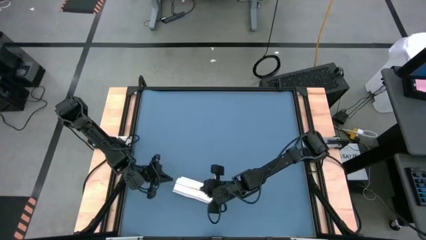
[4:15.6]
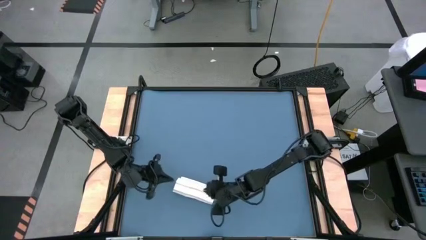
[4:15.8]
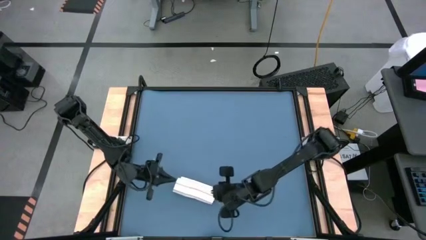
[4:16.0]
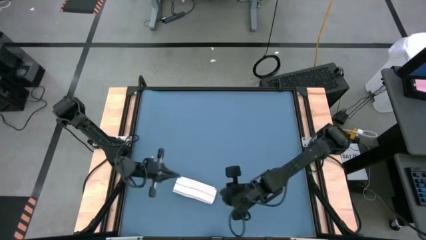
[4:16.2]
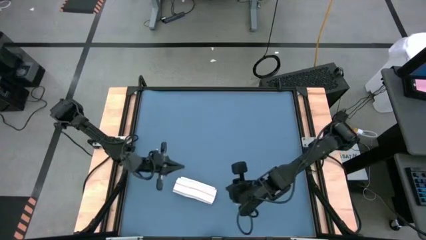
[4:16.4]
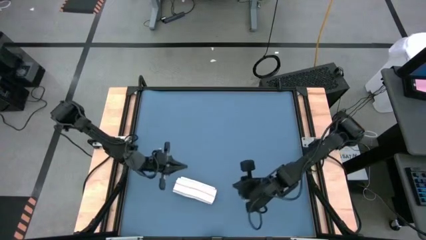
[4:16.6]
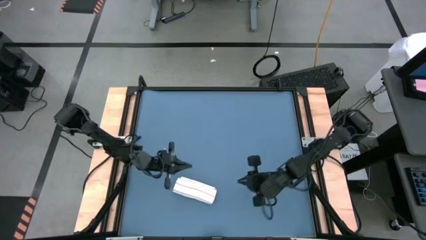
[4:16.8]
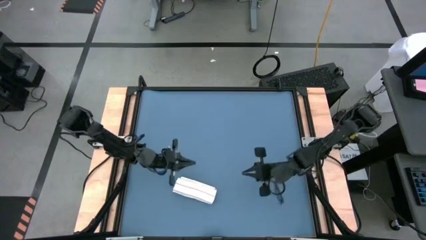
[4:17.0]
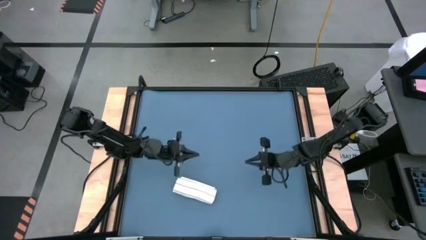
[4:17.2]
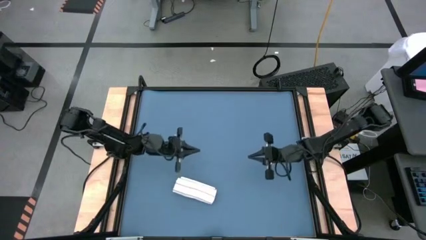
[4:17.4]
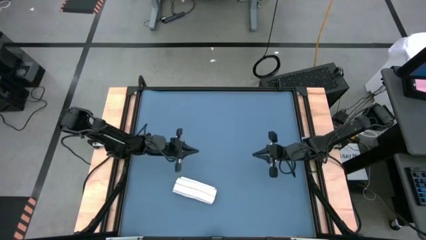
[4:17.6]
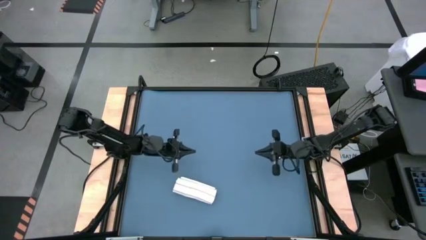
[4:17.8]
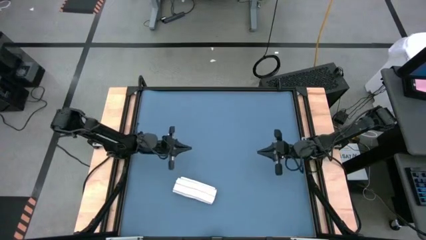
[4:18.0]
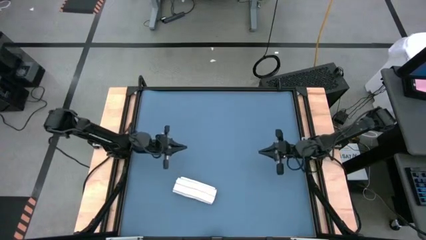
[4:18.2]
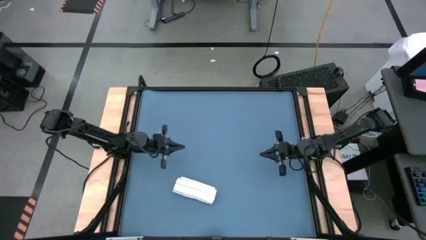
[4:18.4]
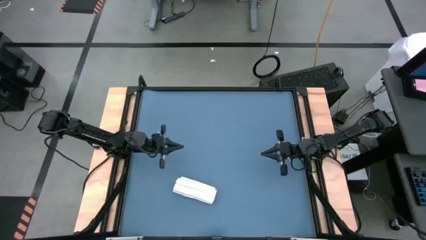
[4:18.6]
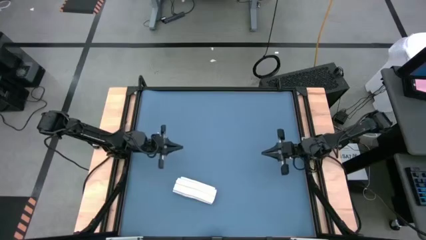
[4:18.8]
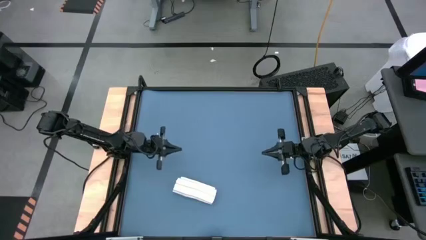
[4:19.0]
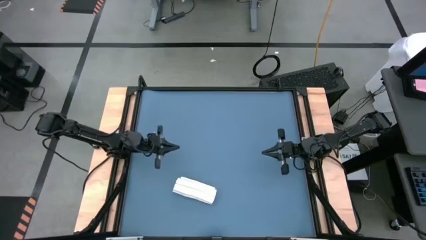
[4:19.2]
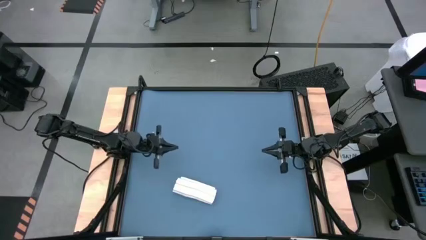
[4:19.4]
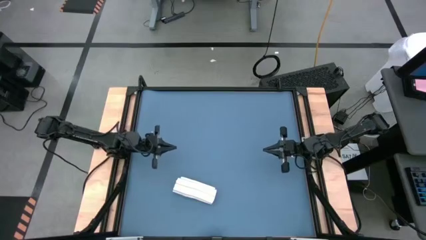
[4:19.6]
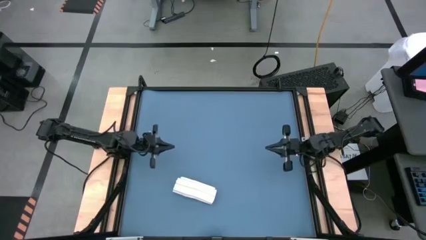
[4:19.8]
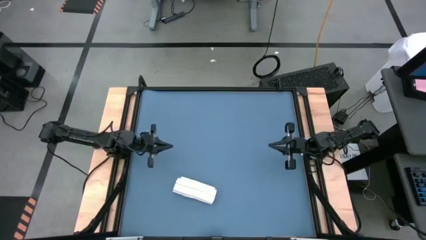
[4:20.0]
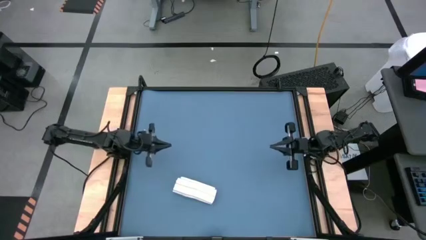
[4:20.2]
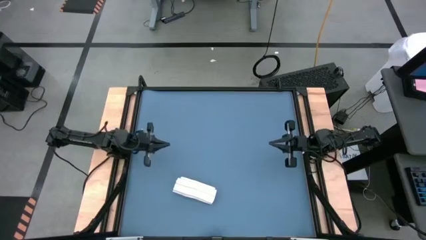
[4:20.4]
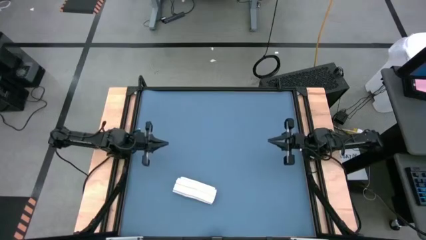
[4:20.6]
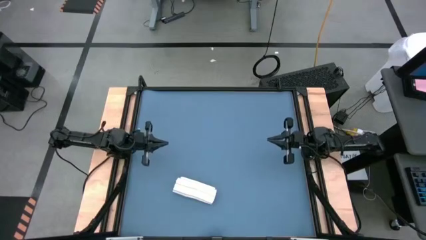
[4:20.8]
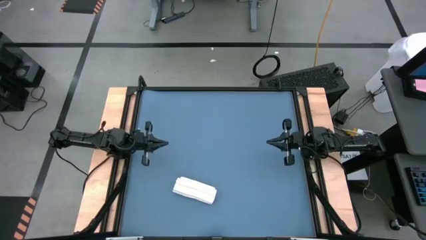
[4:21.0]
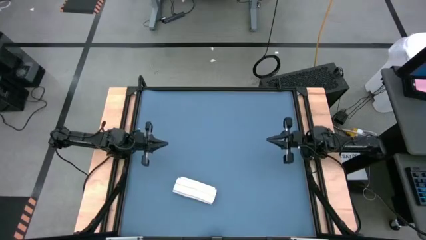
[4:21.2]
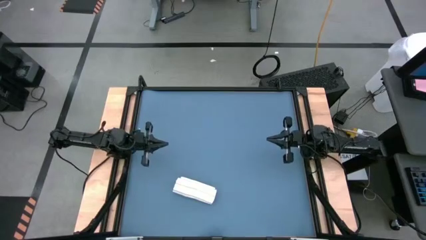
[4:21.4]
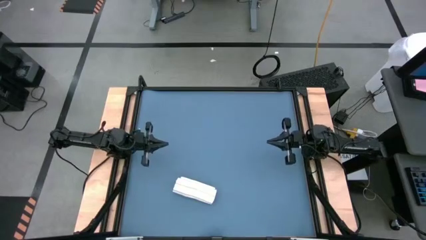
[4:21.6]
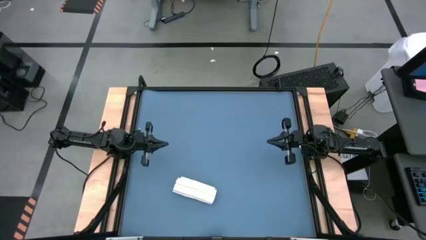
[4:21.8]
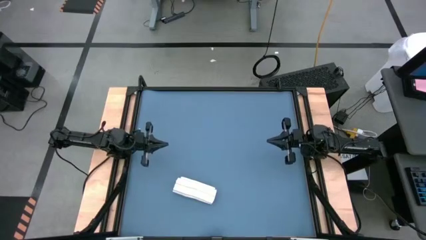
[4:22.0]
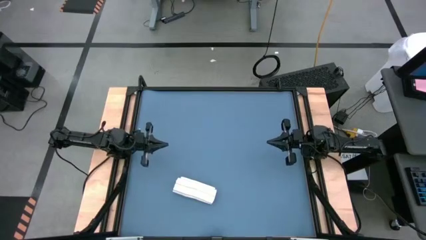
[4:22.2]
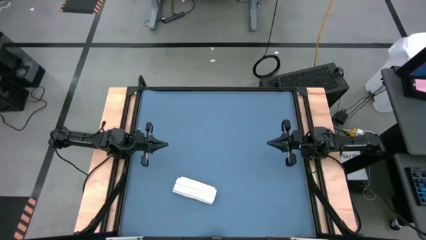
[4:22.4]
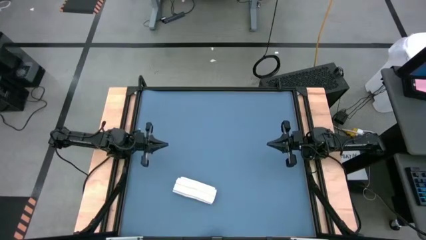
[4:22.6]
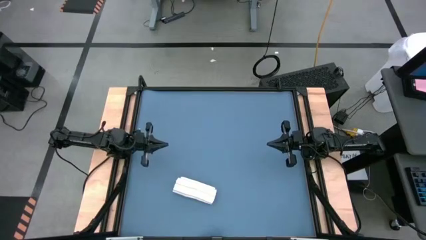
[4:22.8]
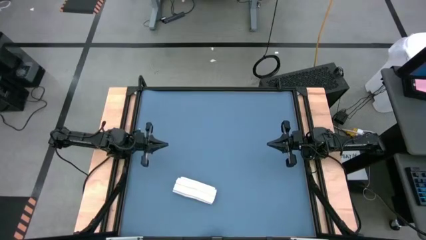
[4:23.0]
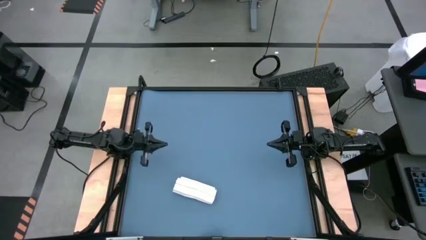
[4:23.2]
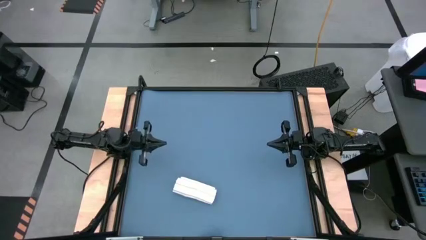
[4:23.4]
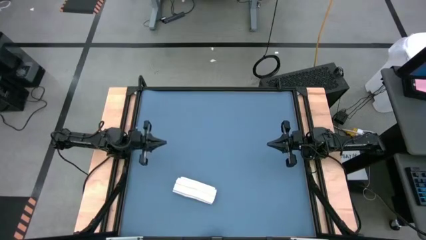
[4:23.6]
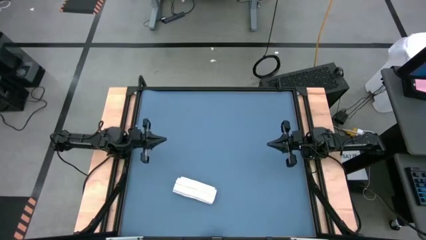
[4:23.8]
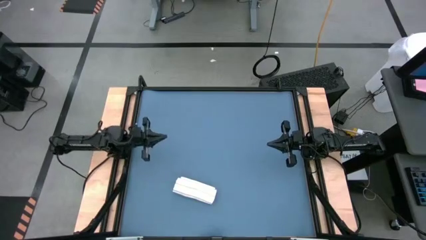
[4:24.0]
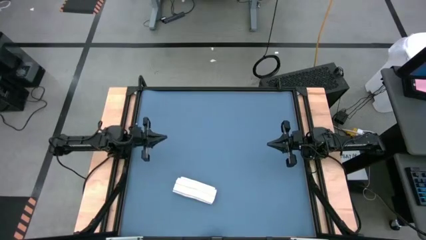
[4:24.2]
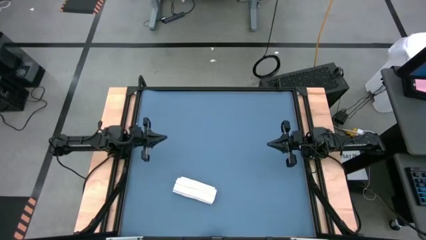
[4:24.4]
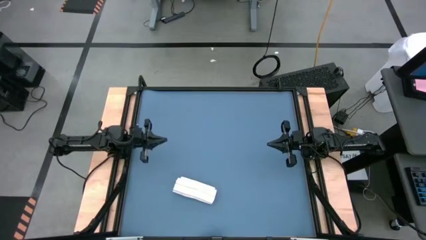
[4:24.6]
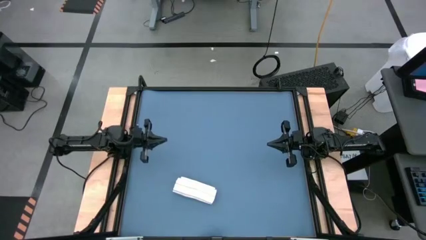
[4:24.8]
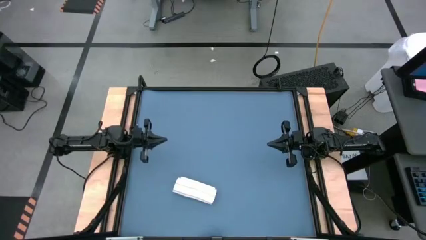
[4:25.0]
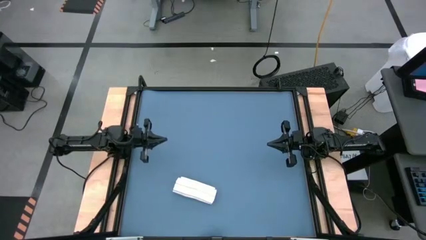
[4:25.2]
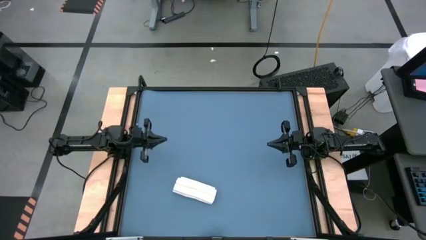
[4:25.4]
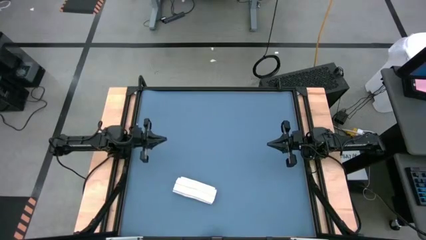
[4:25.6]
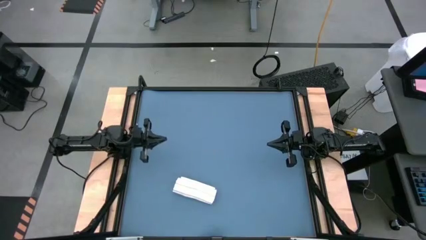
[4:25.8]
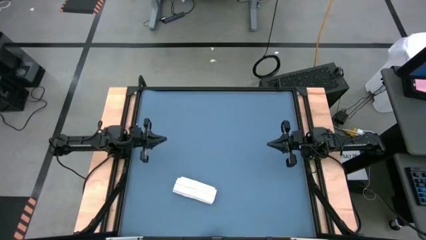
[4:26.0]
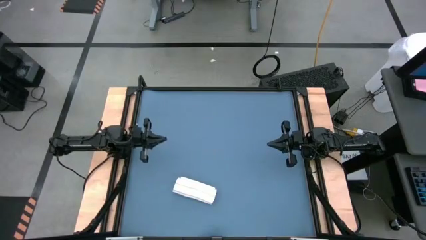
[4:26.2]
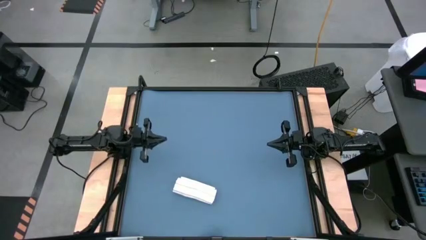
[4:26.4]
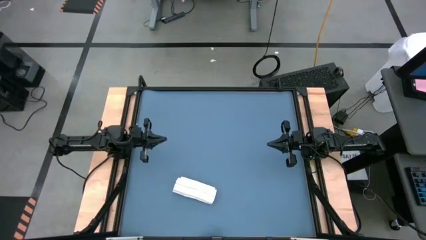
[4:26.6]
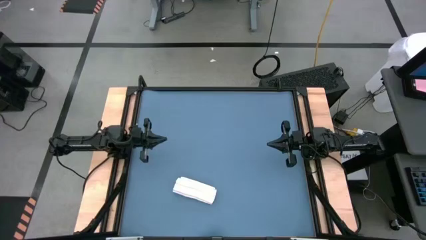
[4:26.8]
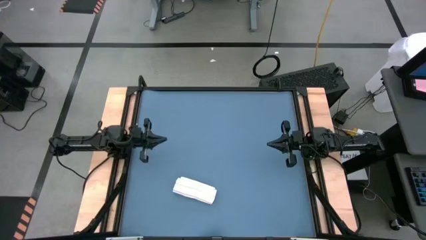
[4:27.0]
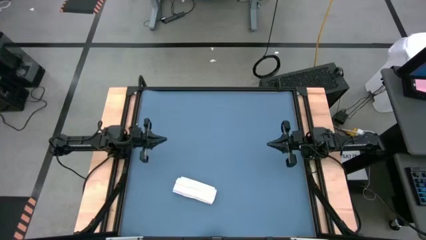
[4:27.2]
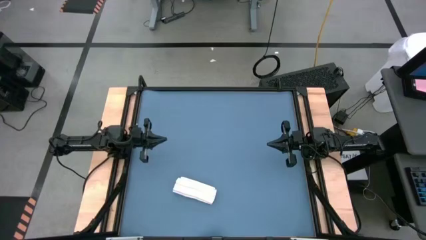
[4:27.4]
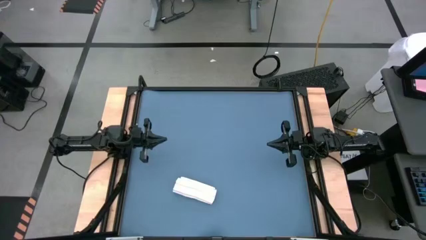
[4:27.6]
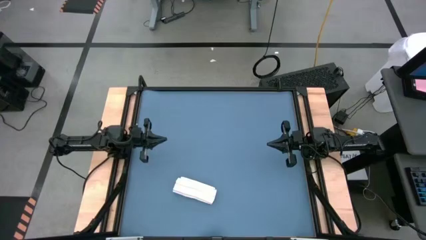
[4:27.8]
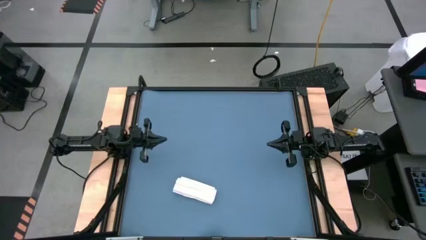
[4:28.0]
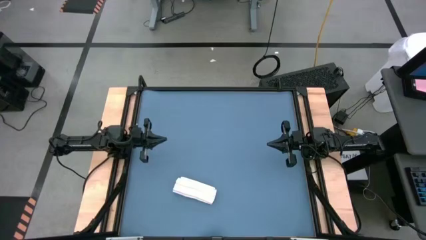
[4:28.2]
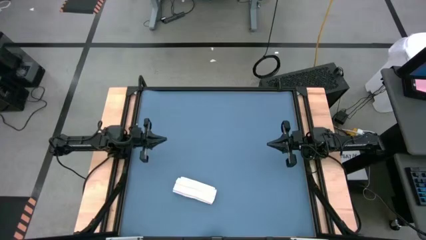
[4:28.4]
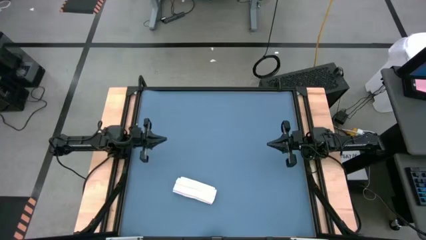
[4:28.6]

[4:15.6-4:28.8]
Task: Roll towel
Return to Home Position

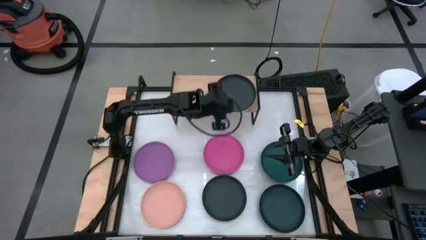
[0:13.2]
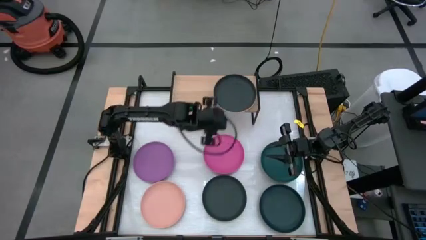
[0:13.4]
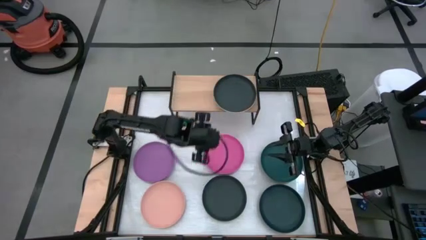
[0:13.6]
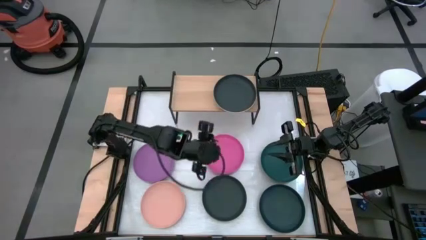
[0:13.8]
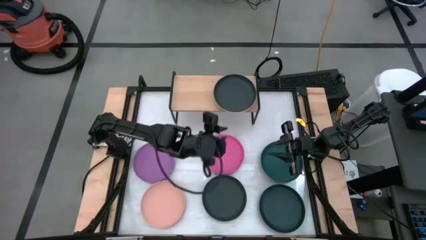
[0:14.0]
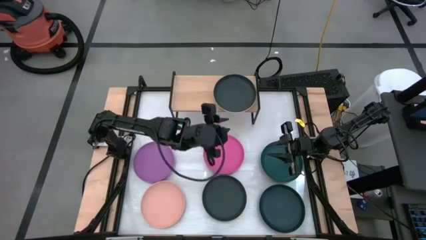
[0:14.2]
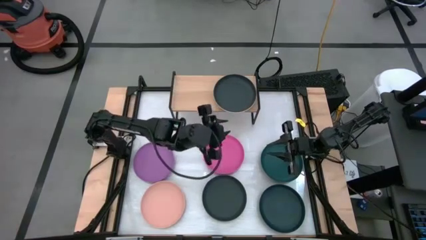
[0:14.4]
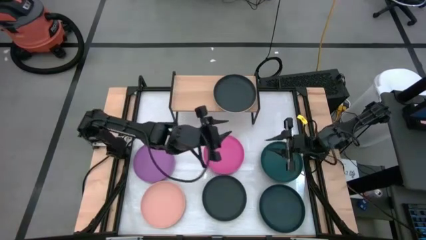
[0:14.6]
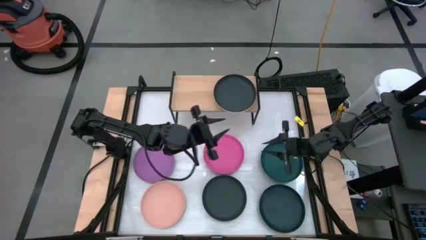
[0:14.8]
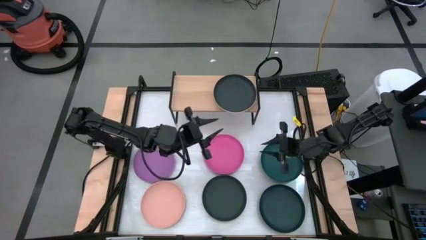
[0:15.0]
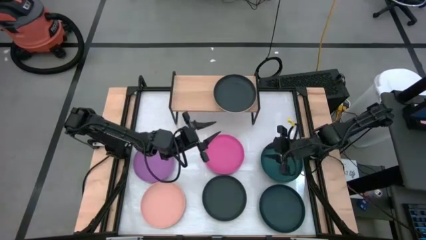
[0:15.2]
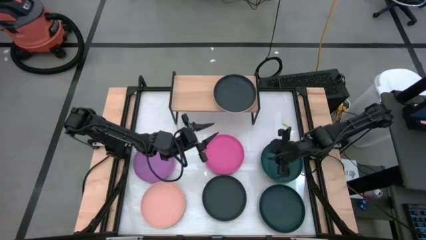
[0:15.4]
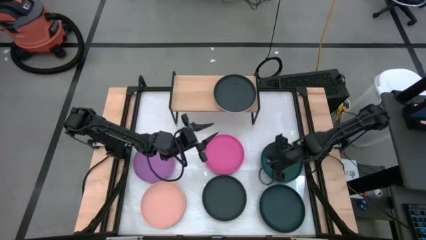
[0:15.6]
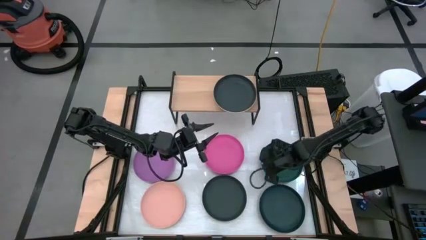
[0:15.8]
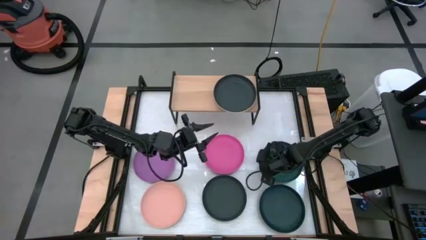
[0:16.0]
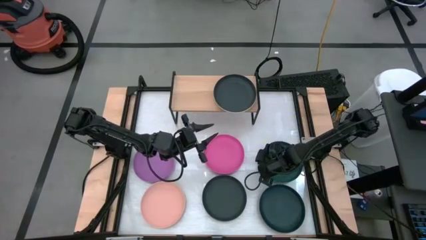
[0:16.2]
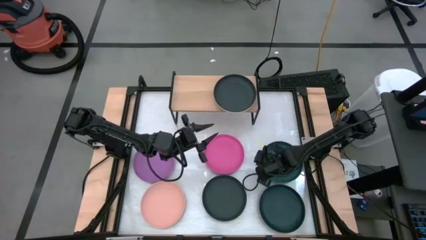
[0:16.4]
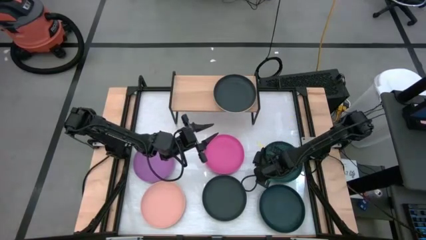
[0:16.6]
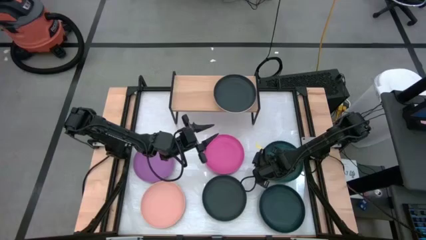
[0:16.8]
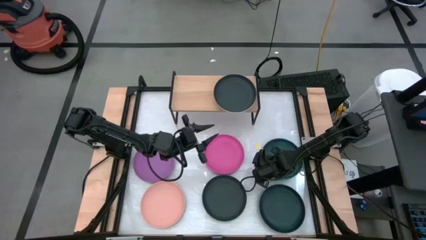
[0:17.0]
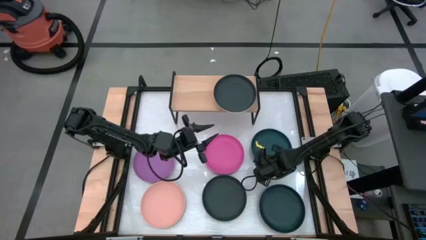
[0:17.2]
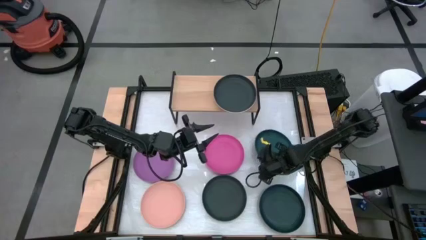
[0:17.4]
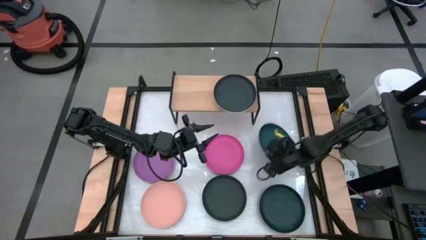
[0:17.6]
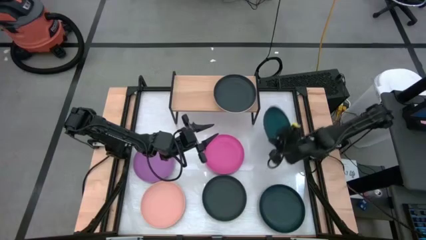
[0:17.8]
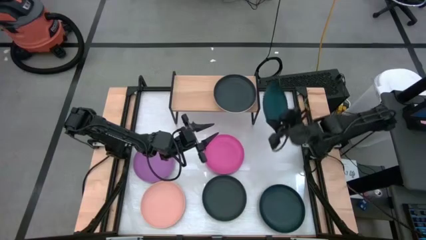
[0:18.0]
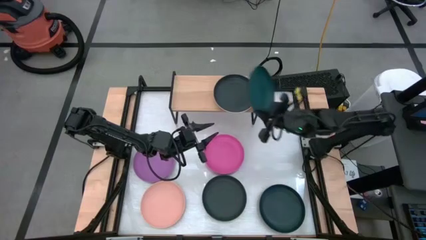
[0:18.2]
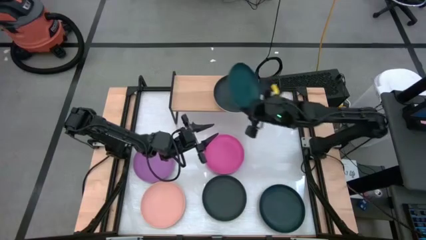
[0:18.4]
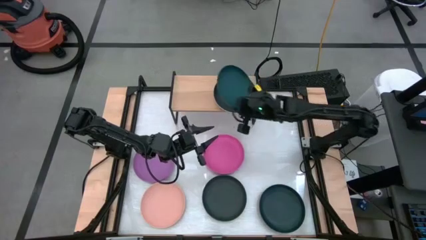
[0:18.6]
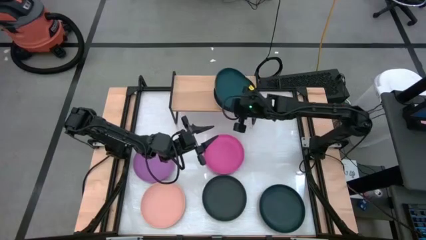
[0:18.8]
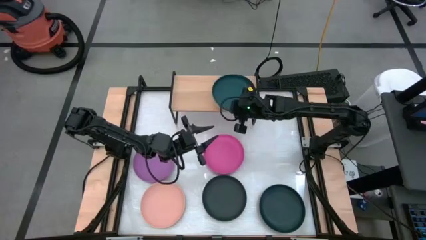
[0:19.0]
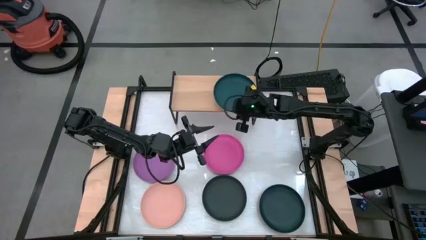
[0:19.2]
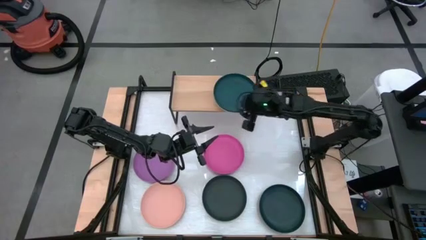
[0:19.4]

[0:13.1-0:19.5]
Task: Place and stack plates onto a shelf
Stack the top dark green plate on top of the black plate on the shelf
